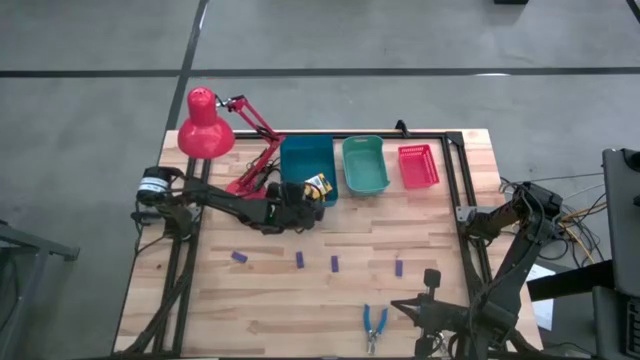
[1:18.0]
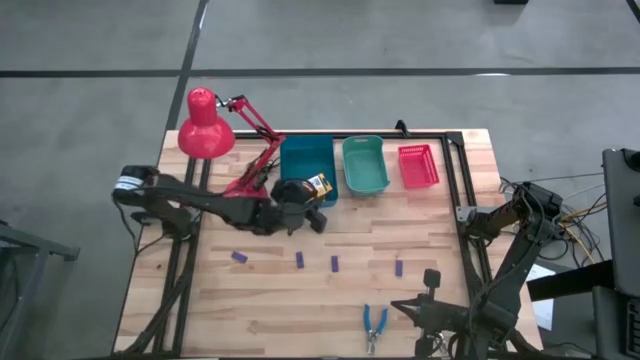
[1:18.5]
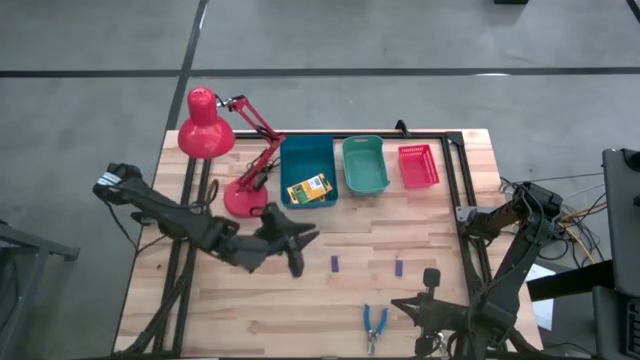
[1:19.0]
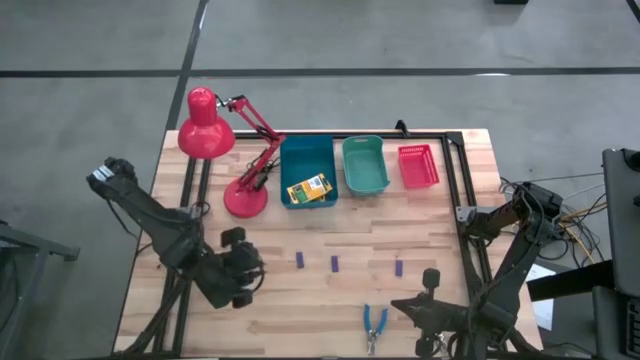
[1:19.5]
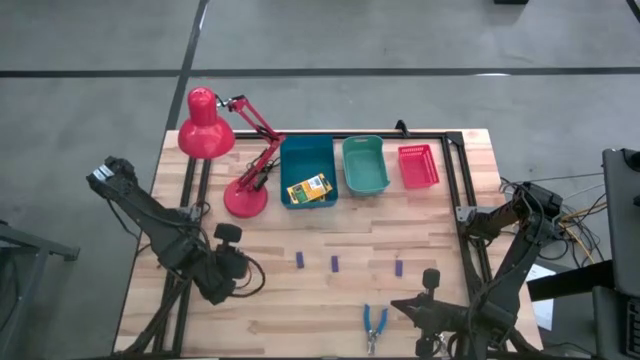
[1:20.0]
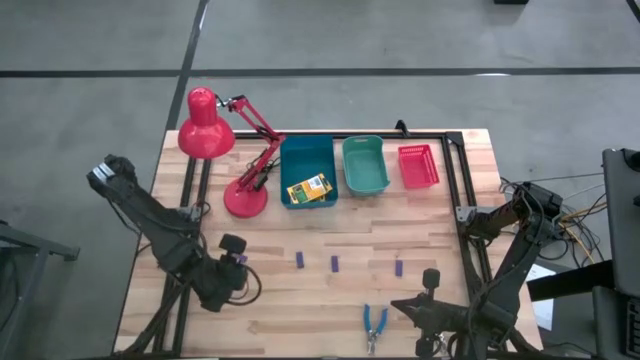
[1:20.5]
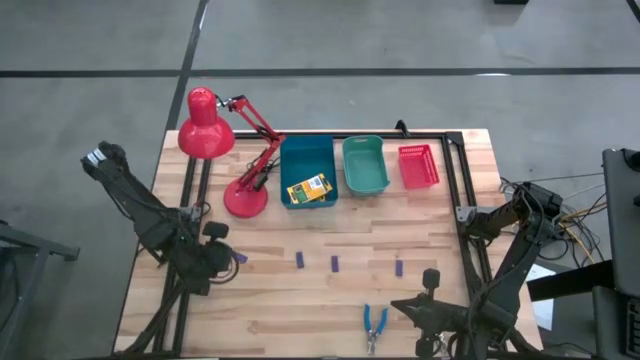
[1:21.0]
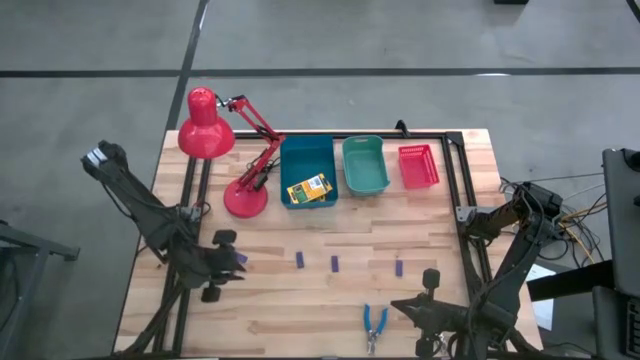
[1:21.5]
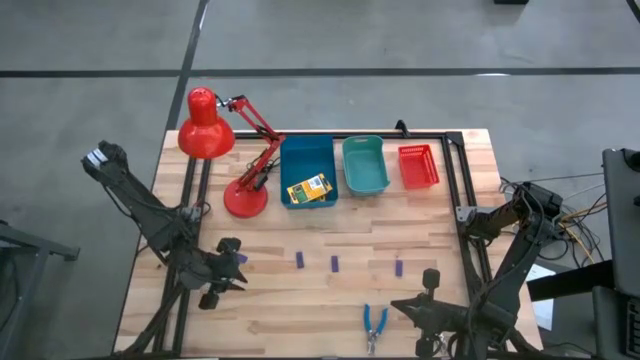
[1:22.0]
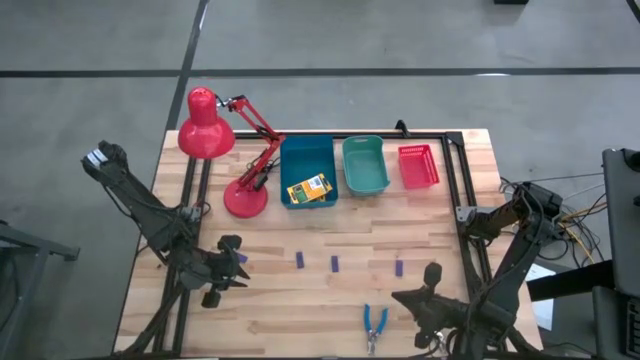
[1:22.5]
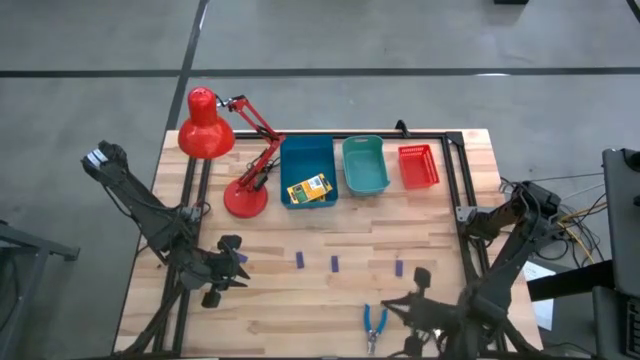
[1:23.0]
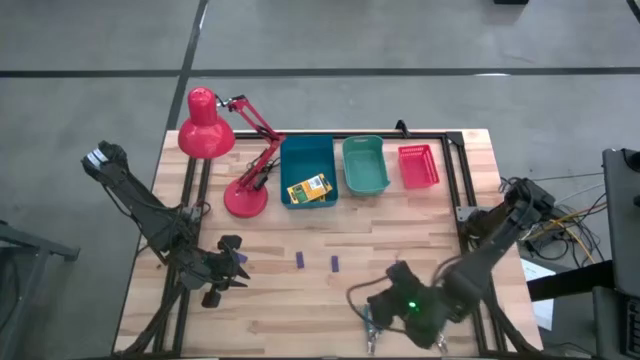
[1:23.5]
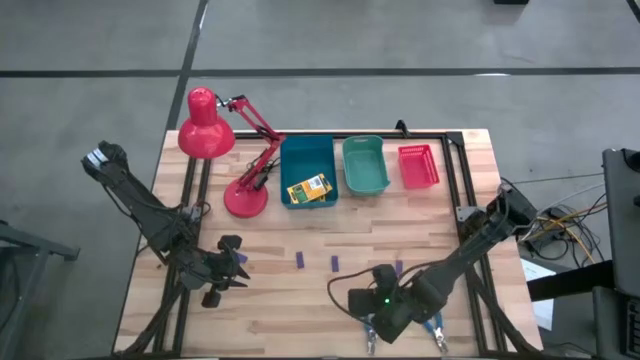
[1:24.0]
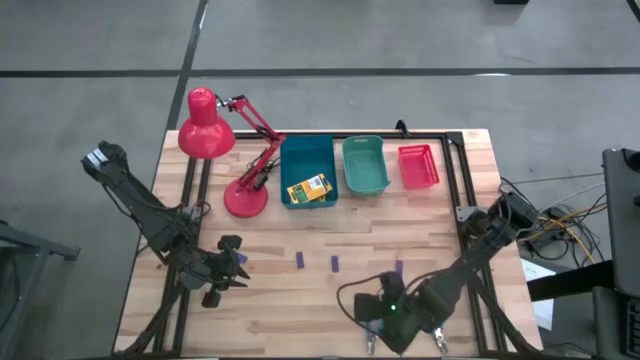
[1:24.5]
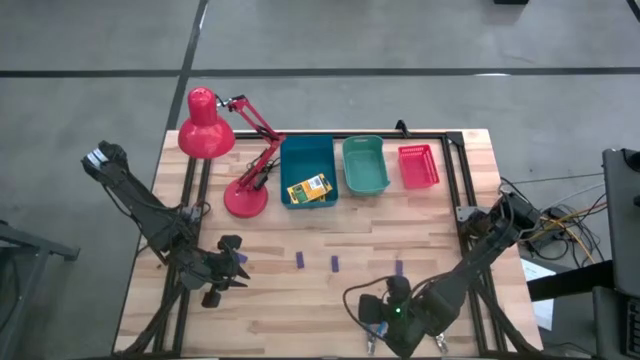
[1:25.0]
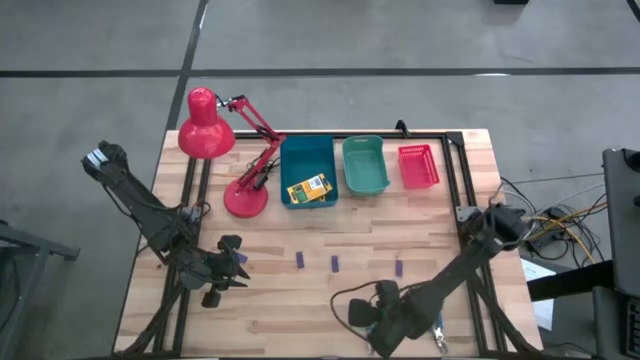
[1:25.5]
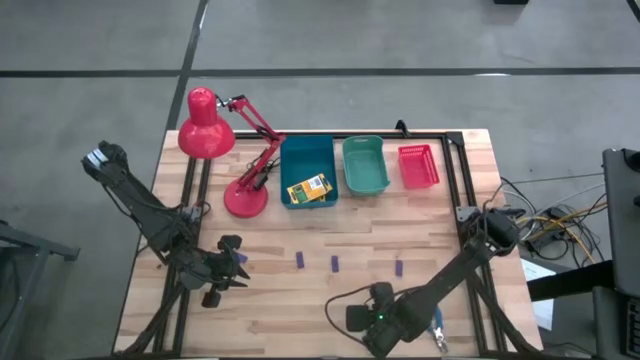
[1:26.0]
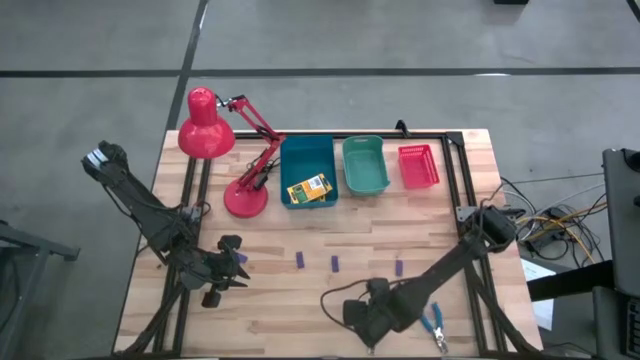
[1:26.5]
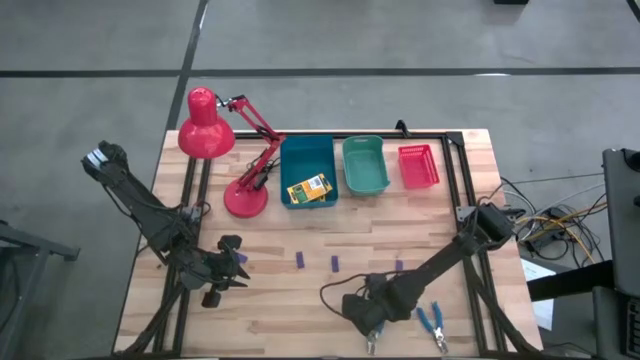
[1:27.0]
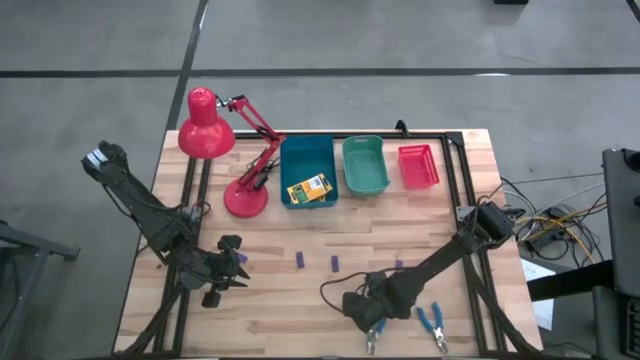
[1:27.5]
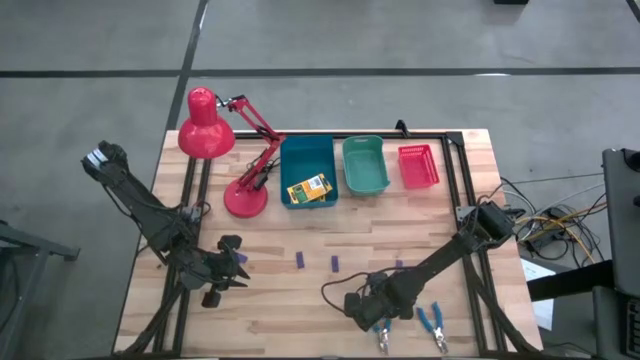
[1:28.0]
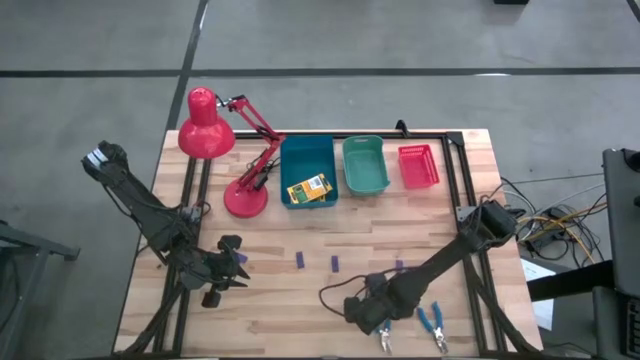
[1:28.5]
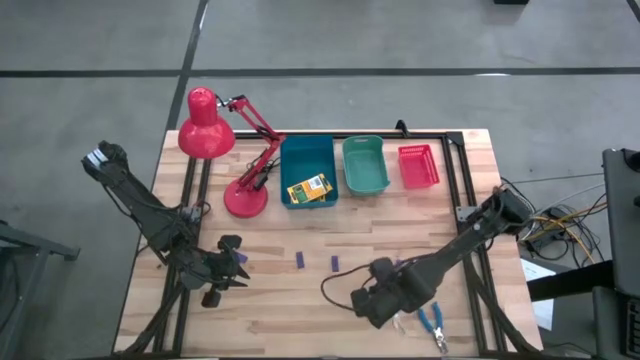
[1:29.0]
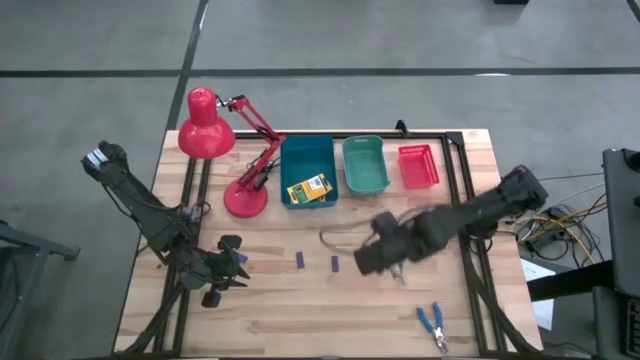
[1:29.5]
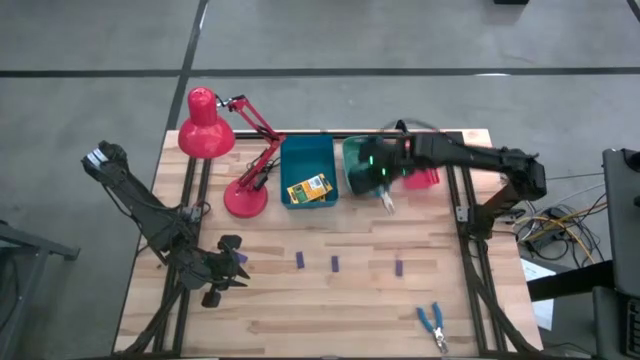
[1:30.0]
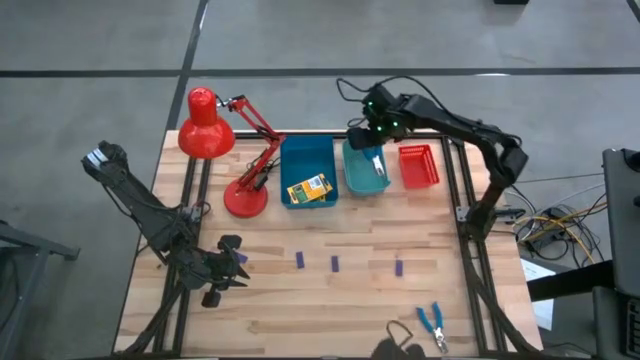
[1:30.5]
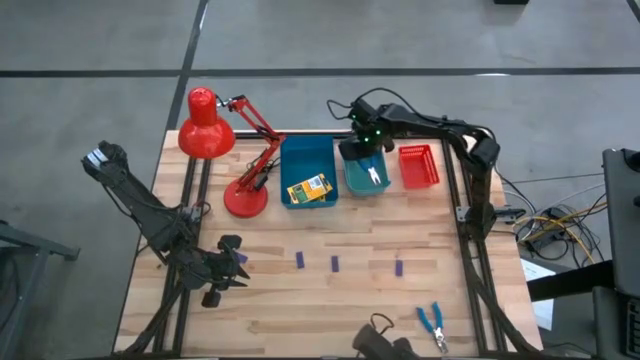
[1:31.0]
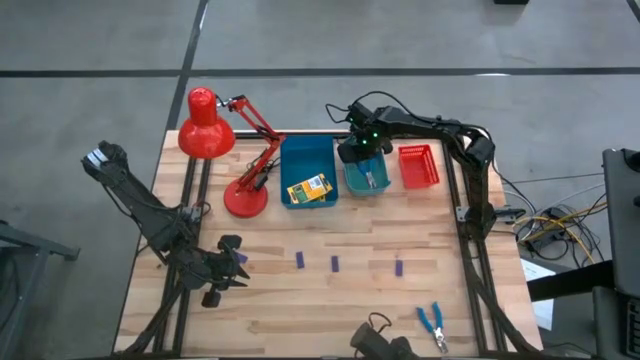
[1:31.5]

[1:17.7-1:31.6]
Task: Pick & Place School Supplies
Put the blue whole punchers into the green bin

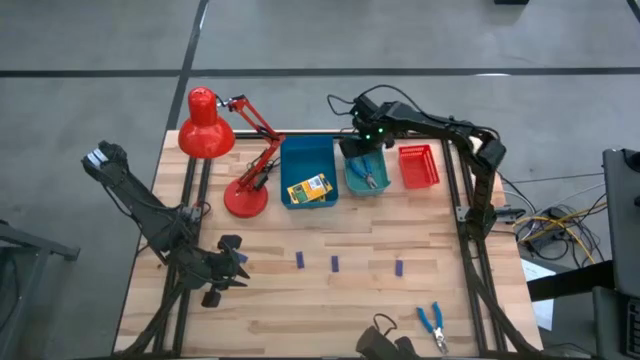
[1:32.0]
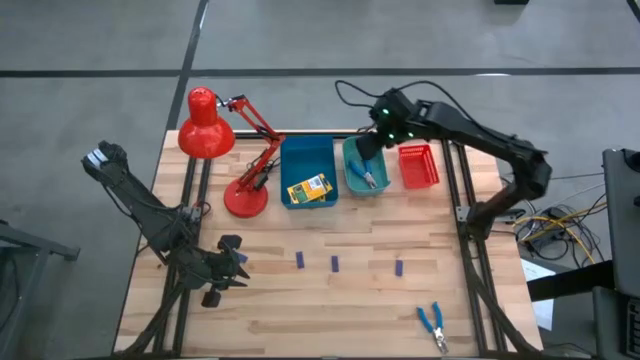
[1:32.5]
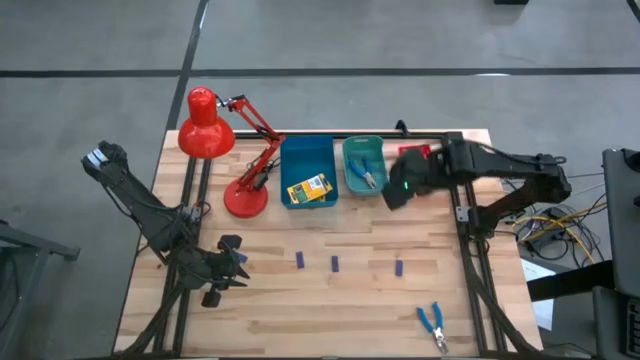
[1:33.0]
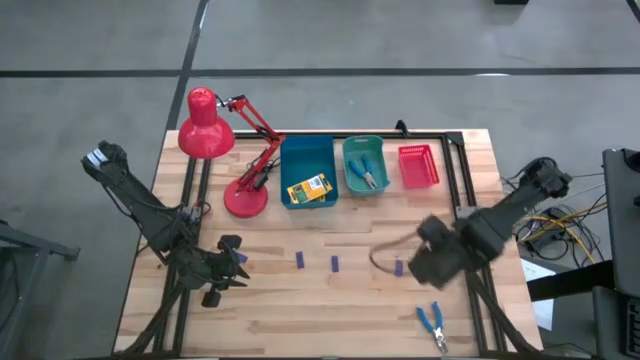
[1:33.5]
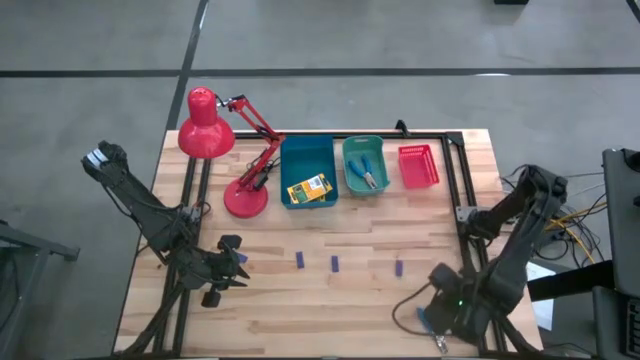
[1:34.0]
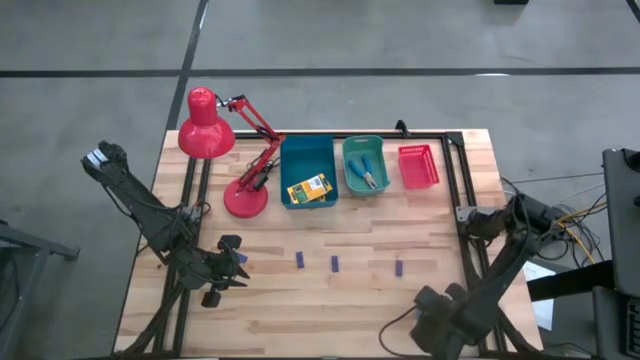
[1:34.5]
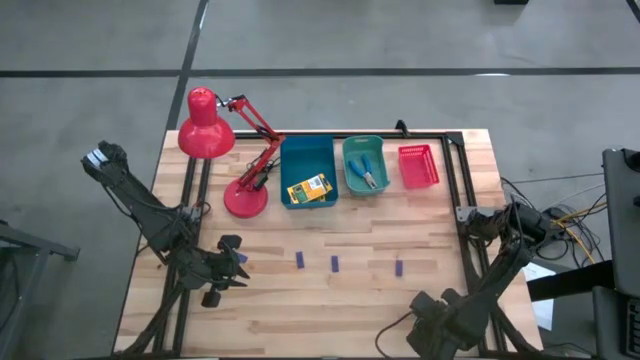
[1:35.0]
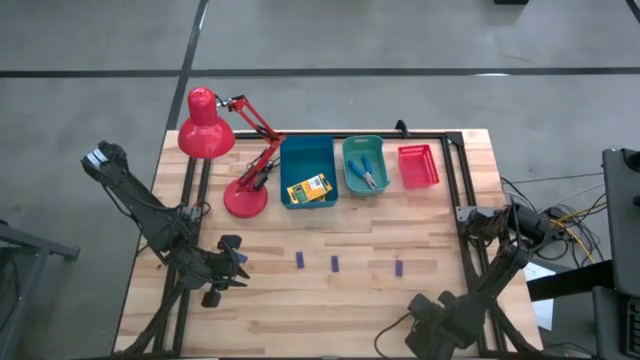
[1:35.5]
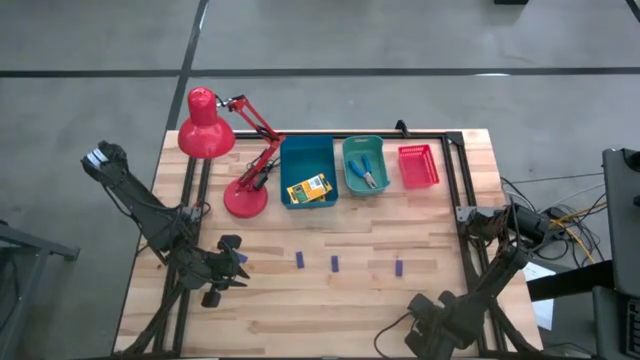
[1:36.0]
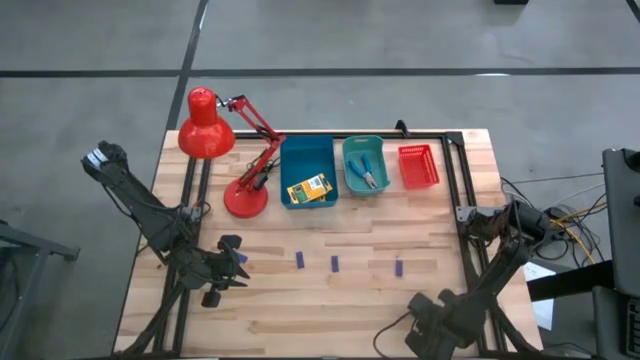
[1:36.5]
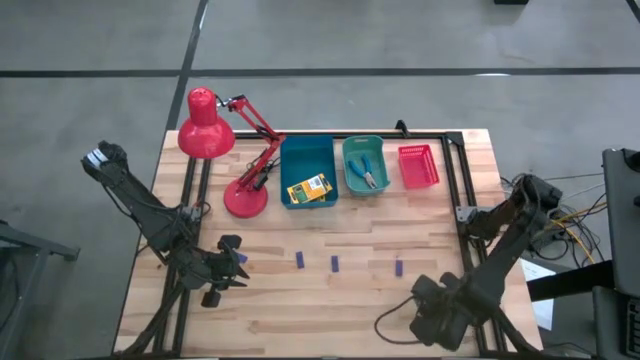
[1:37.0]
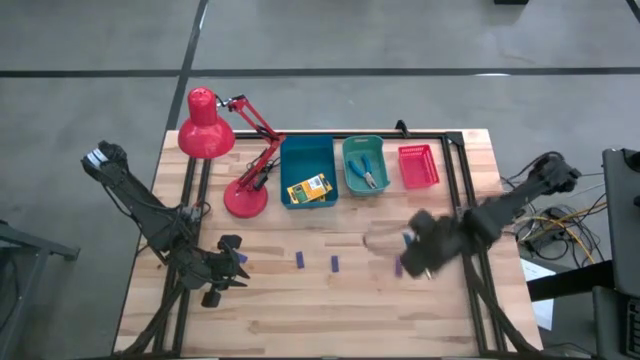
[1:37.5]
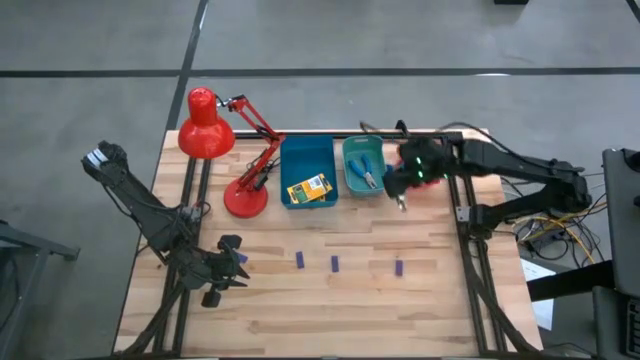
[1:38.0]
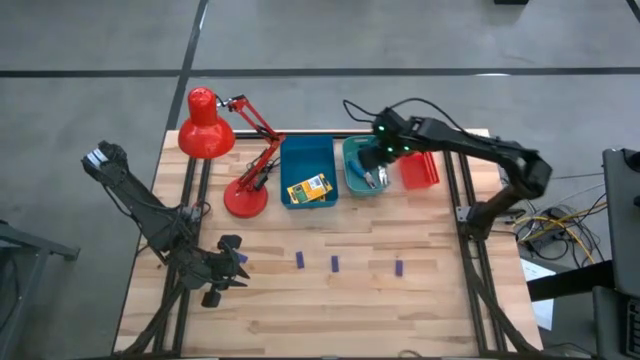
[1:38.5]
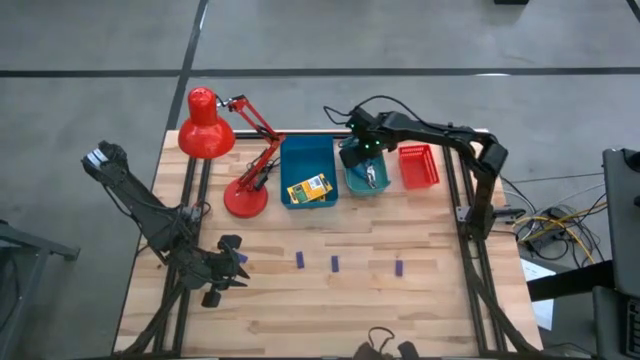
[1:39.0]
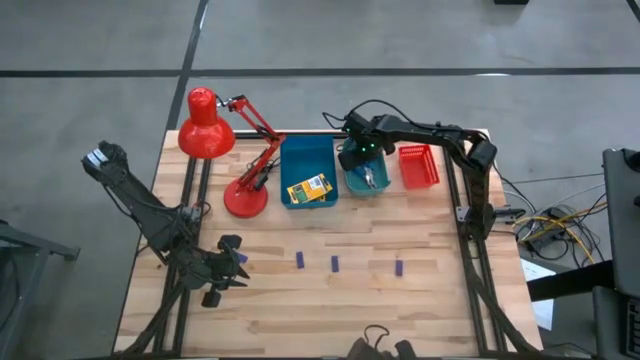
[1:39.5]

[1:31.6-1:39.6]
Put the blue whole punchers into the green bin
